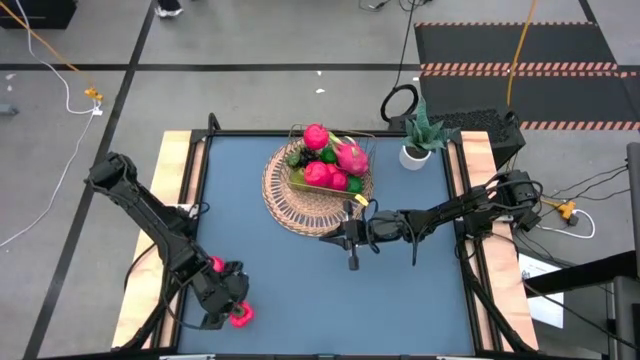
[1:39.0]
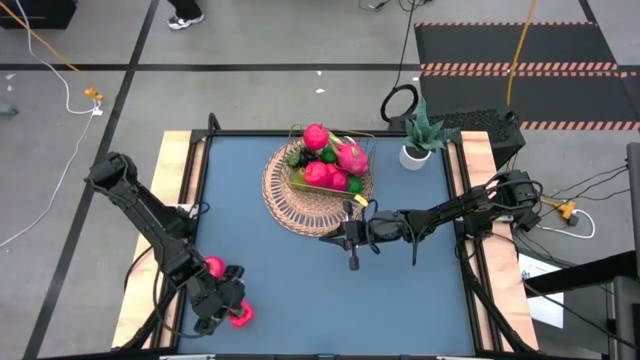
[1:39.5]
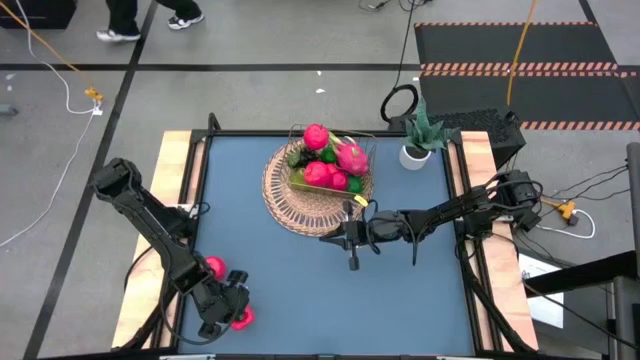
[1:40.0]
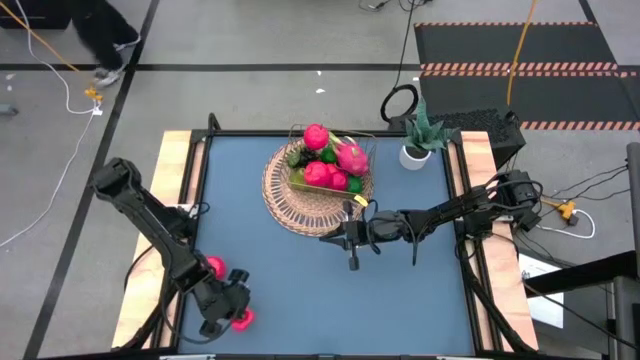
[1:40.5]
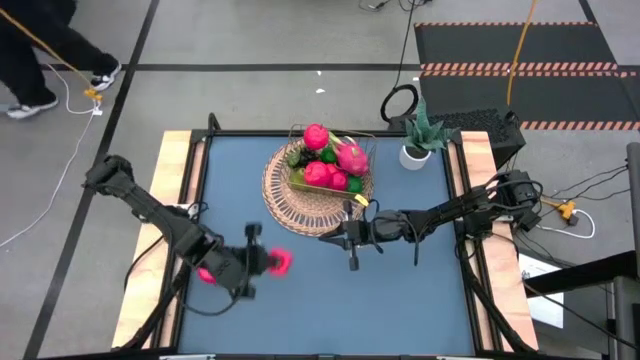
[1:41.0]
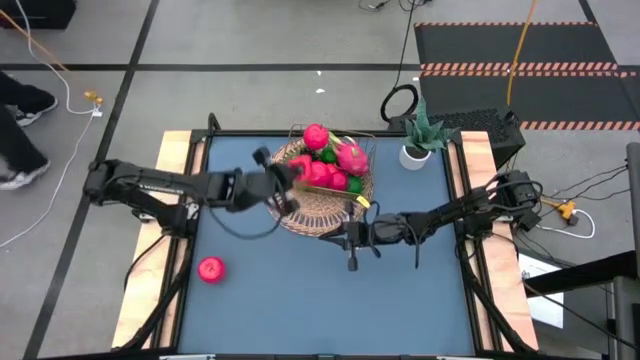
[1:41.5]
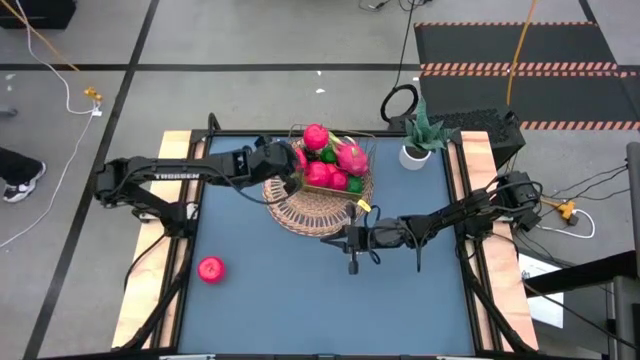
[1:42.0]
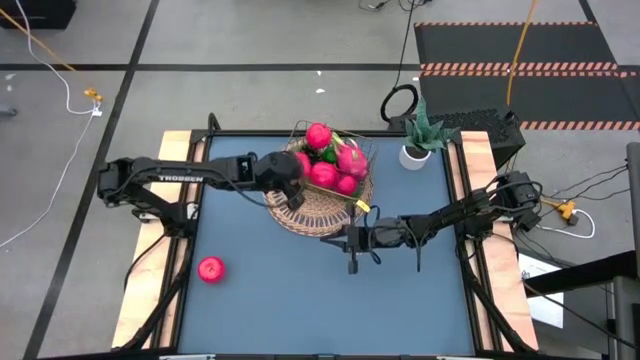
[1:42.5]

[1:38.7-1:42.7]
Task: Build produce basket
Put the bell pepper into the gold wire basket

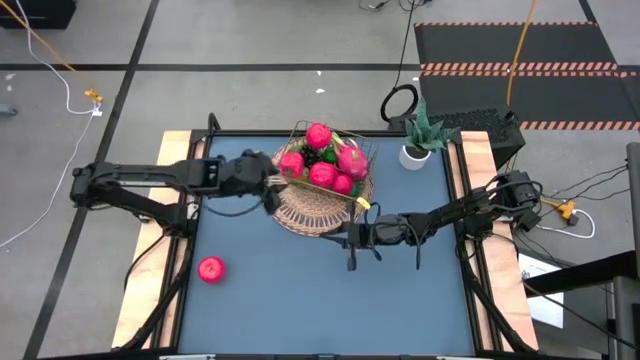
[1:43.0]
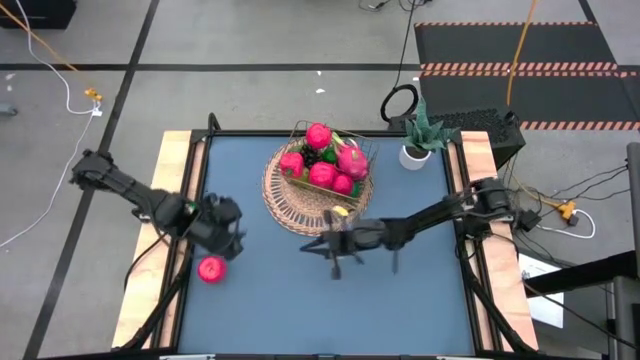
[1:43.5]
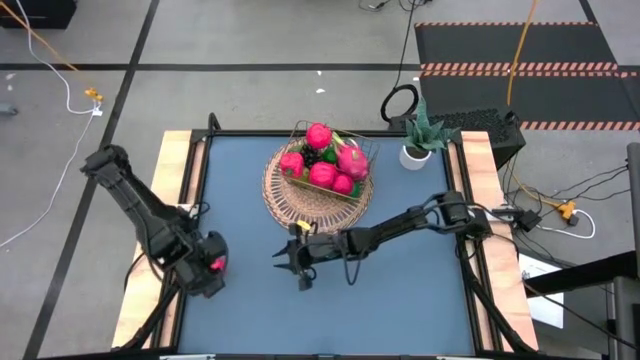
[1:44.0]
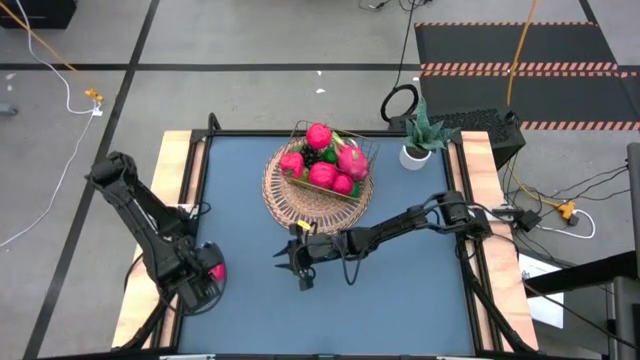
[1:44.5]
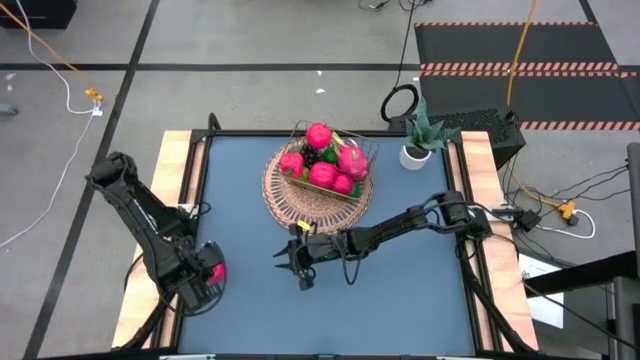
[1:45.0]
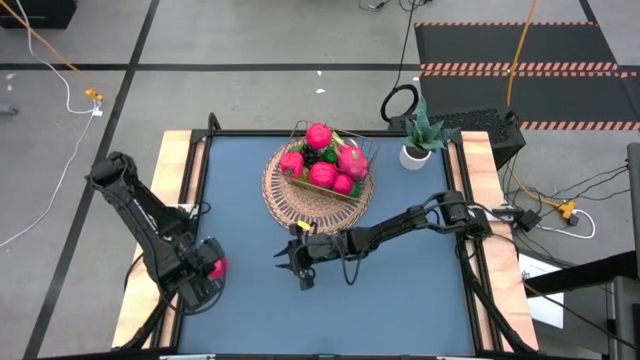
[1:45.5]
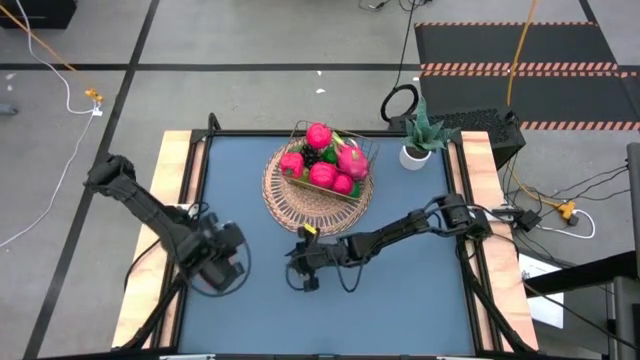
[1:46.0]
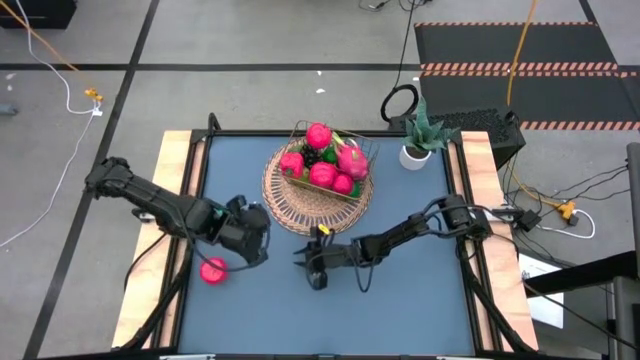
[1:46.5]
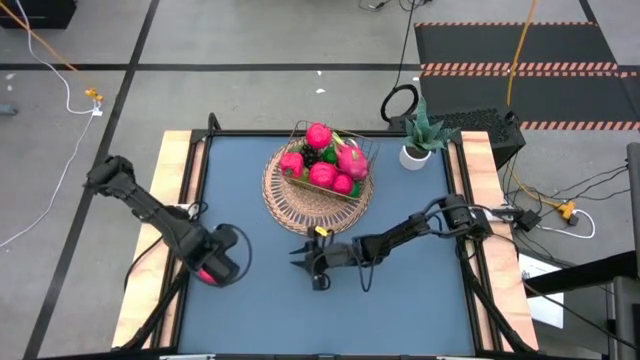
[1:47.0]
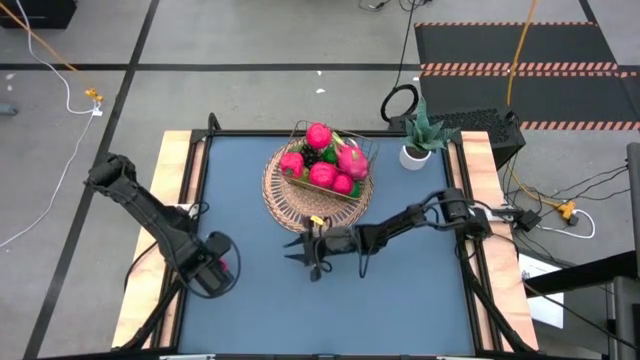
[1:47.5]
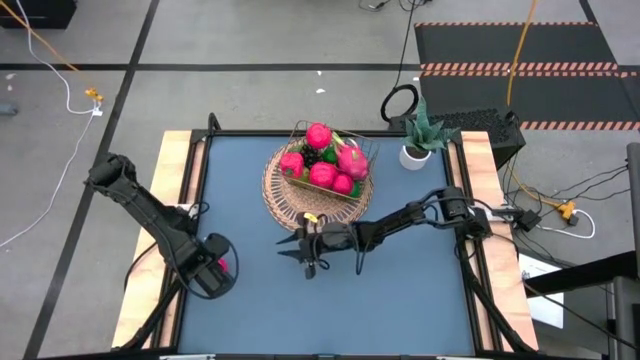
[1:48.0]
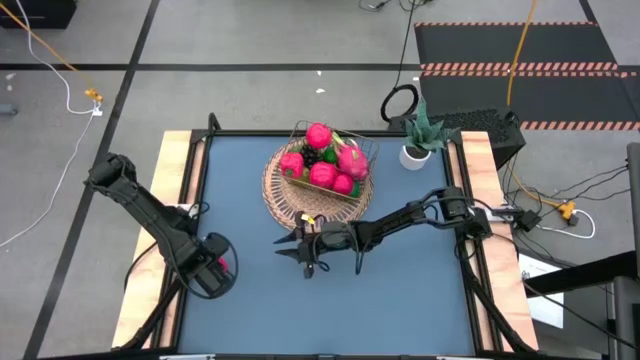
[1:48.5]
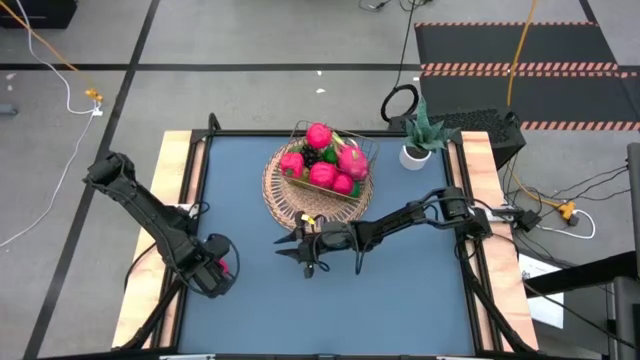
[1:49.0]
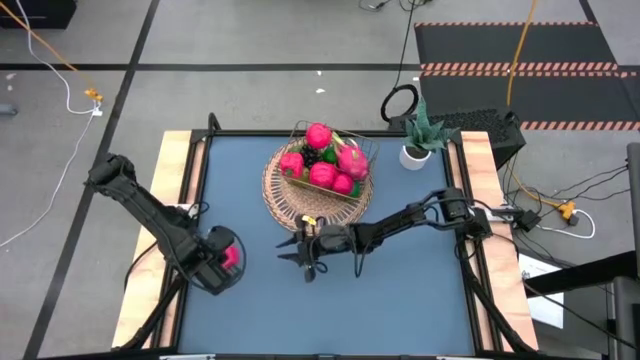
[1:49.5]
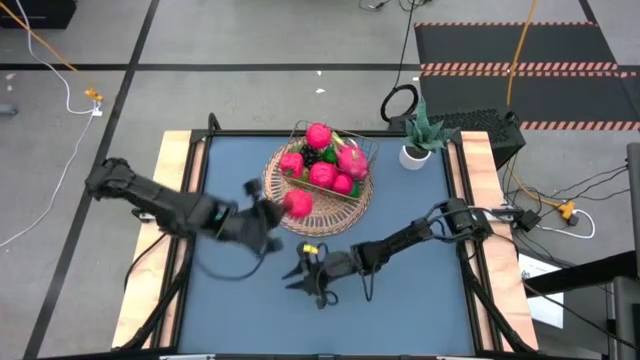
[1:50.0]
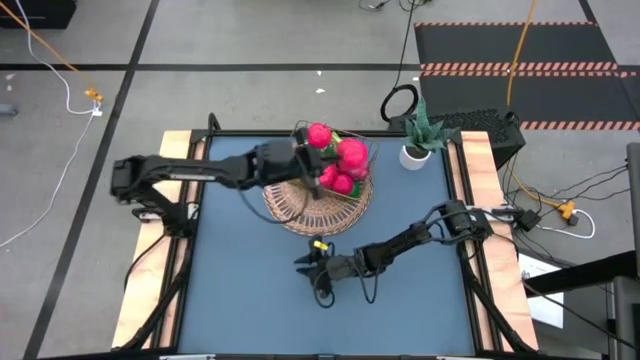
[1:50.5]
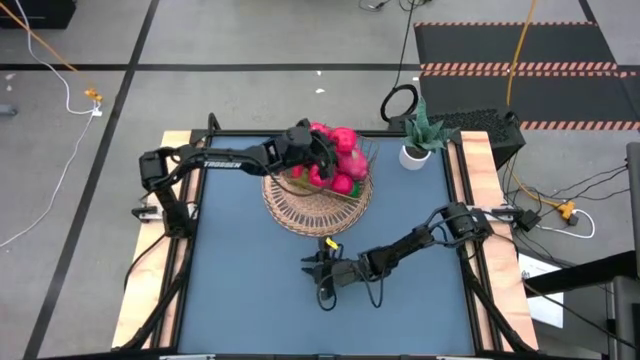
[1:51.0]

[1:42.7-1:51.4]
Put the apple into the gold wire basket

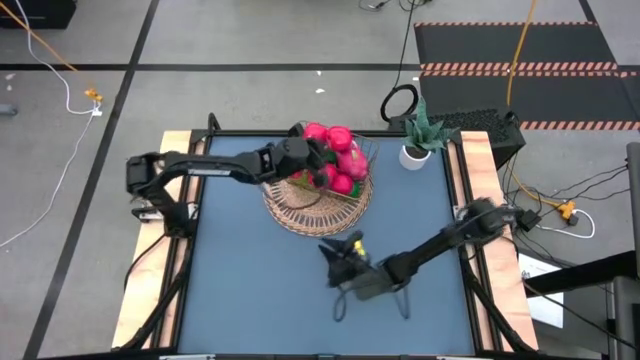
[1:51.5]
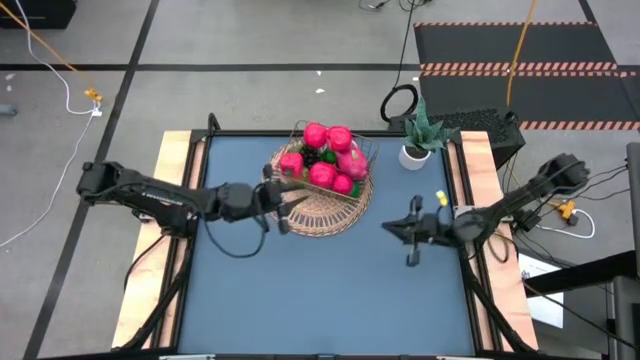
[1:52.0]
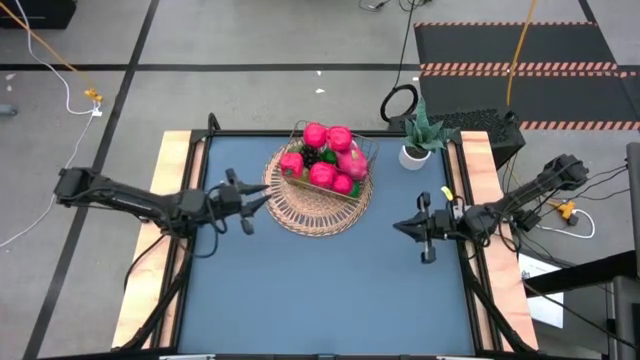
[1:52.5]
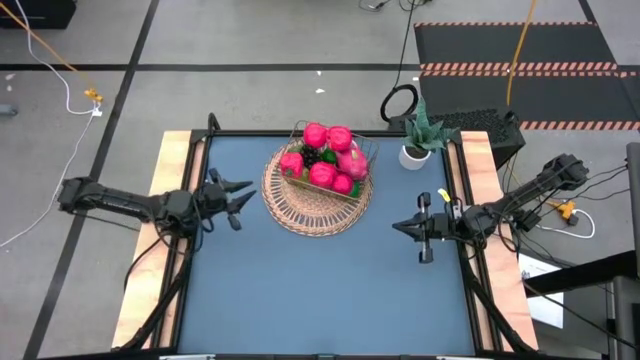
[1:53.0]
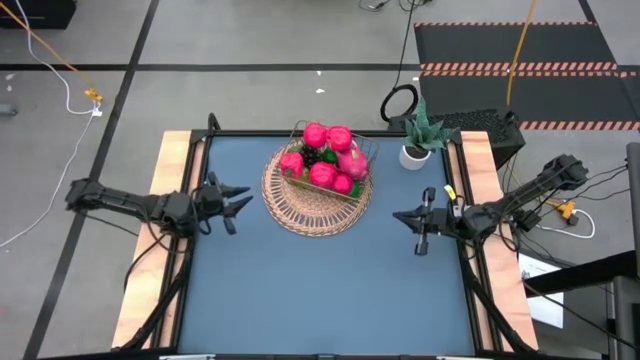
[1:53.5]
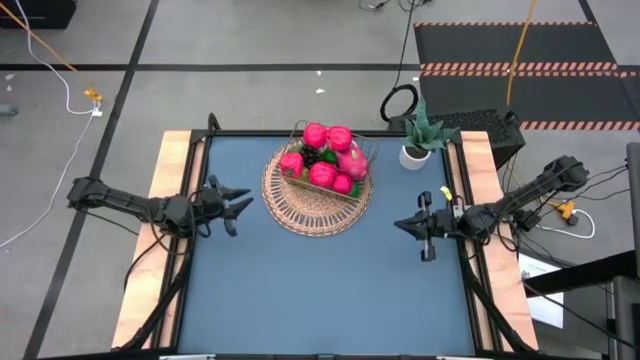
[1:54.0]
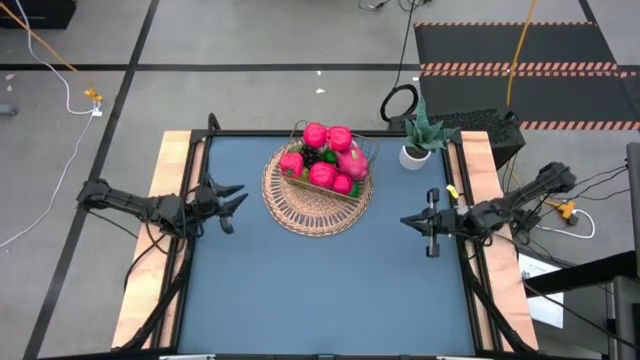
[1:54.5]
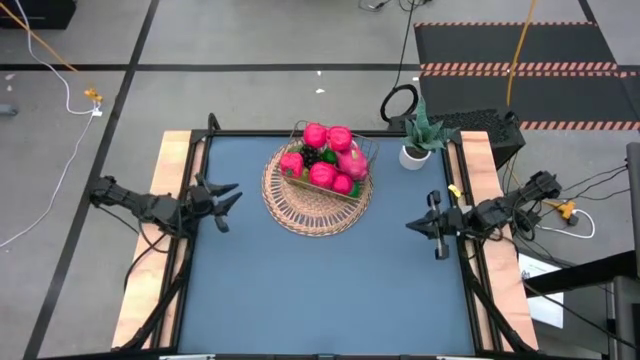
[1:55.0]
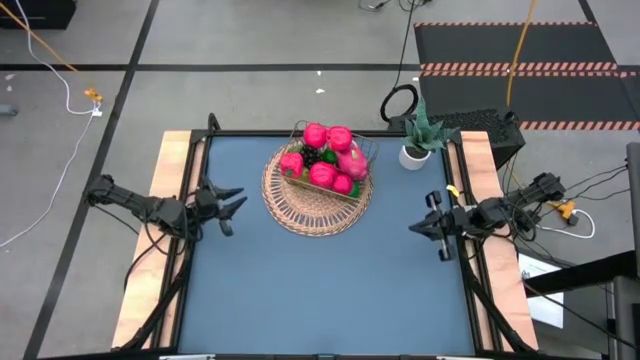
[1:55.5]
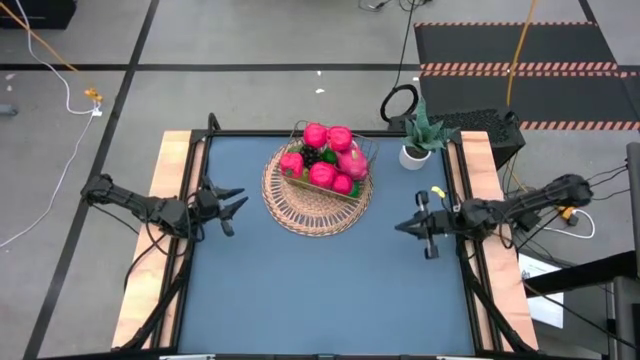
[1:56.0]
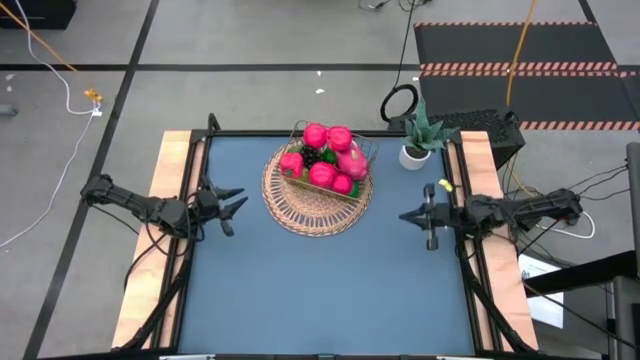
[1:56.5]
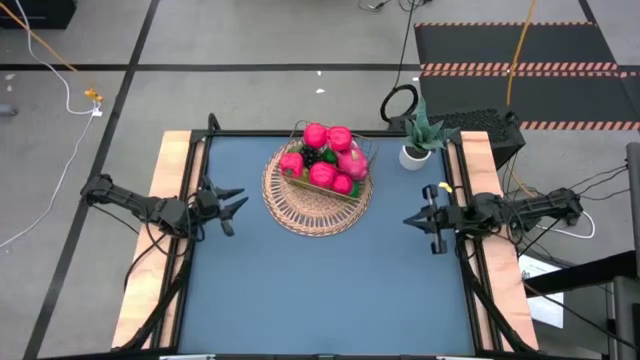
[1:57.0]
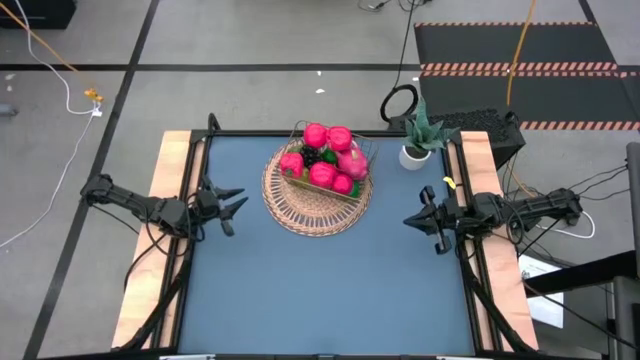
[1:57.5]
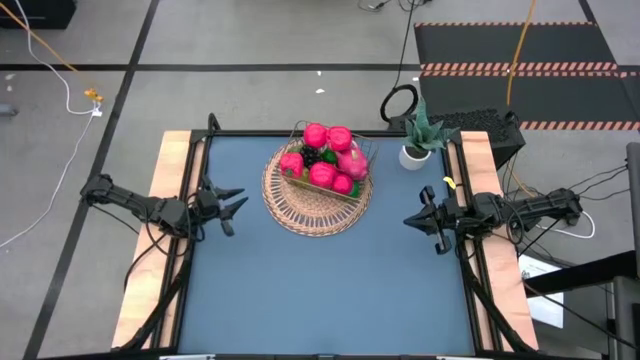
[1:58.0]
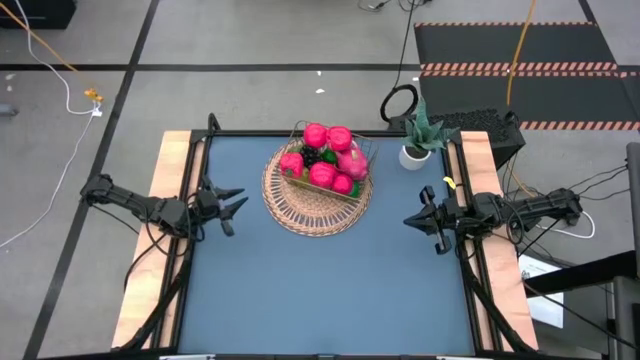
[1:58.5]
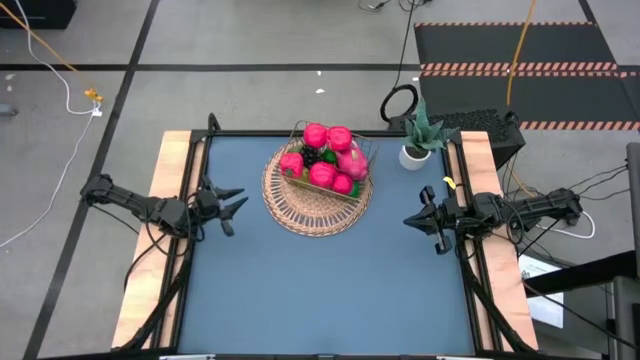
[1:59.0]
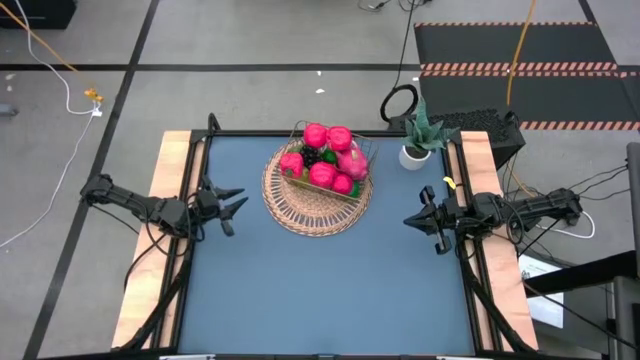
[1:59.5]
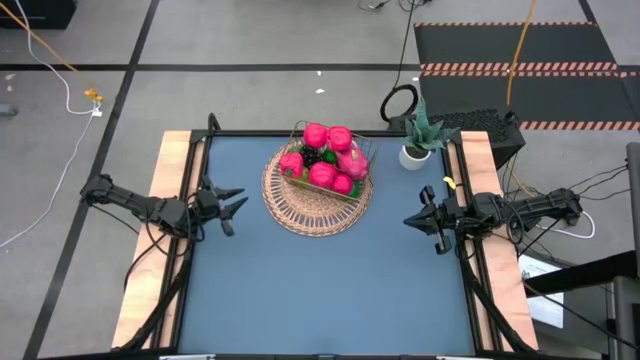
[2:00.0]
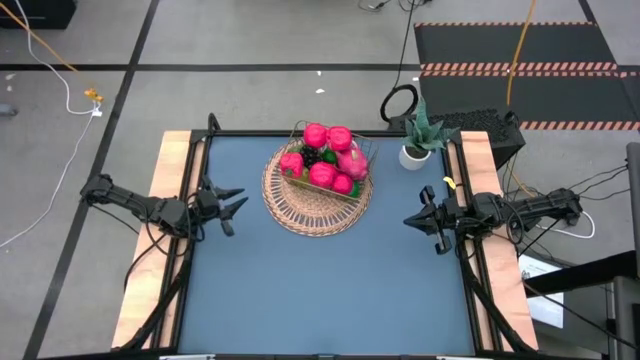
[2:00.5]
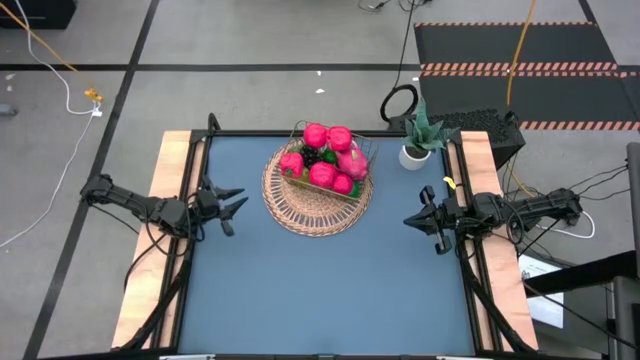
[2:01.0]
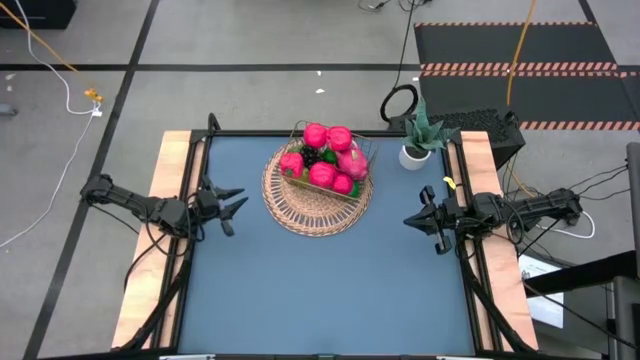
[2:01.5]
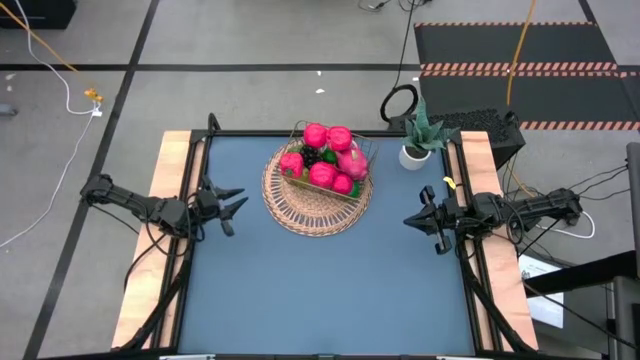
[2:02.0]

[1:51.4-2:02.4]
Return to Home Position
